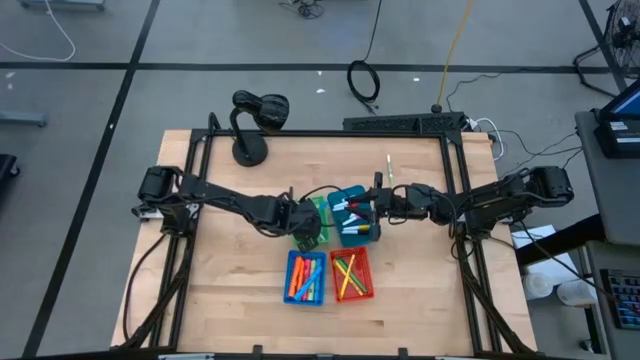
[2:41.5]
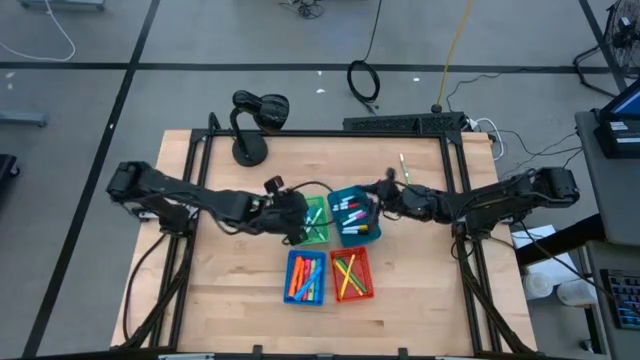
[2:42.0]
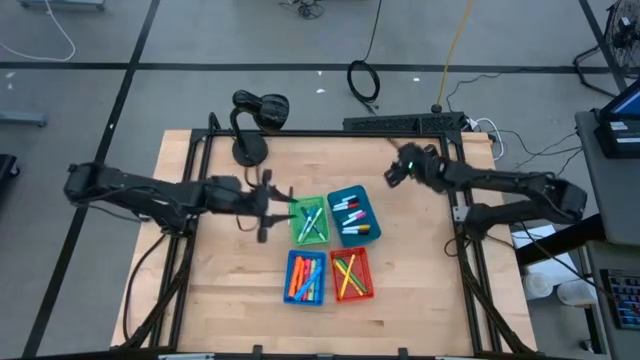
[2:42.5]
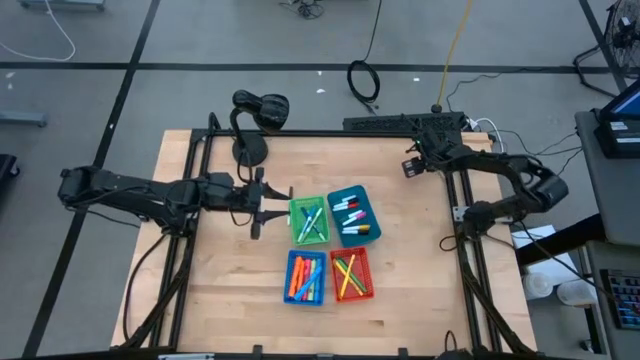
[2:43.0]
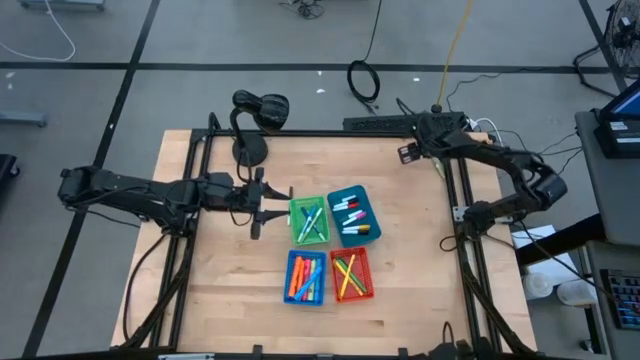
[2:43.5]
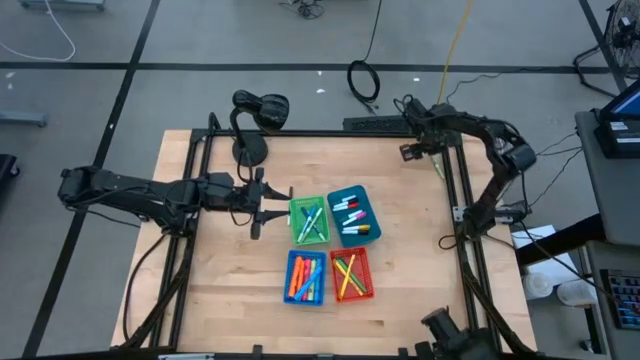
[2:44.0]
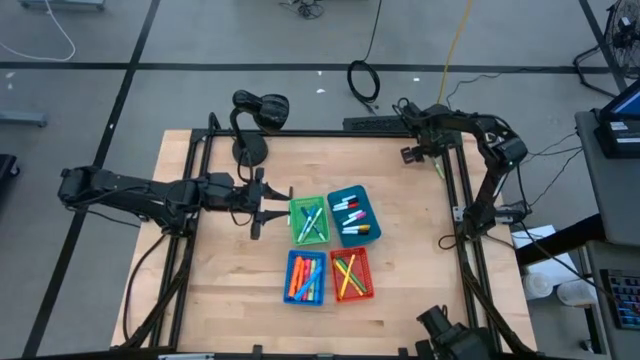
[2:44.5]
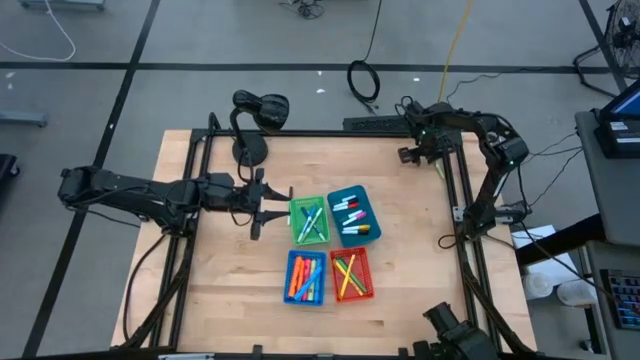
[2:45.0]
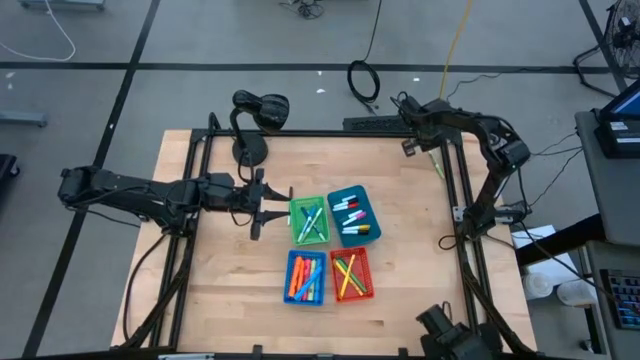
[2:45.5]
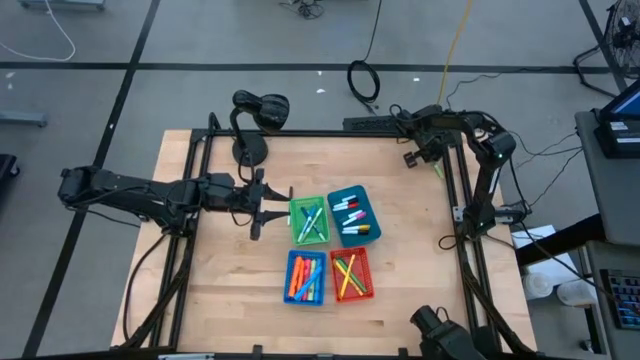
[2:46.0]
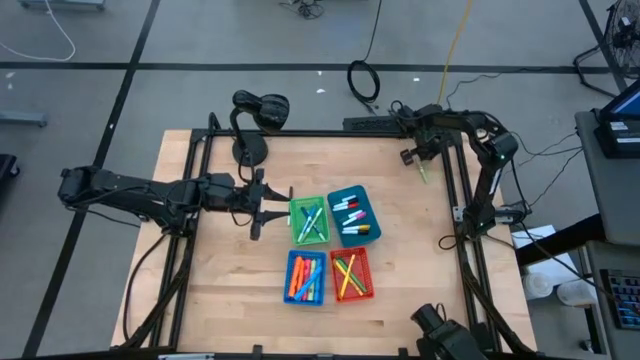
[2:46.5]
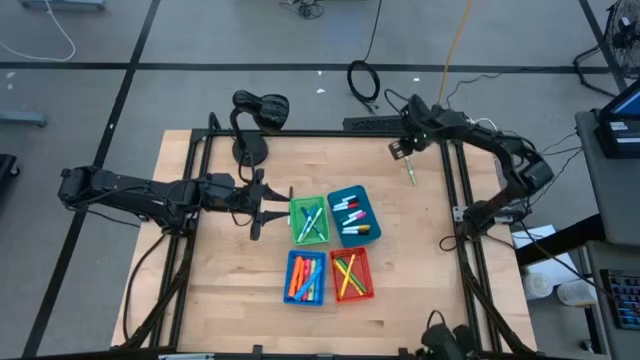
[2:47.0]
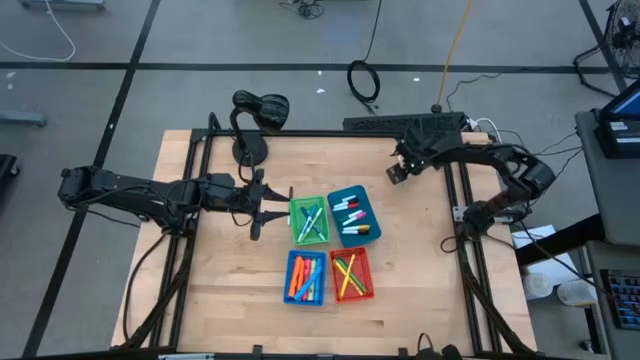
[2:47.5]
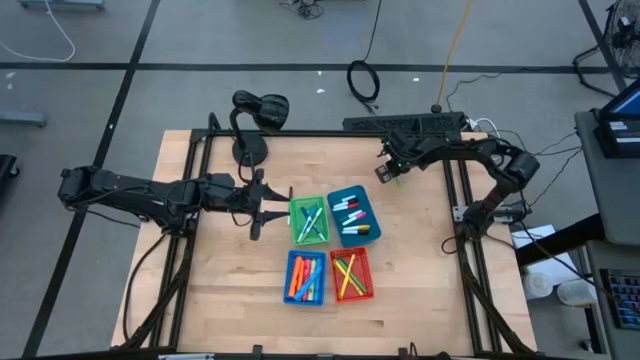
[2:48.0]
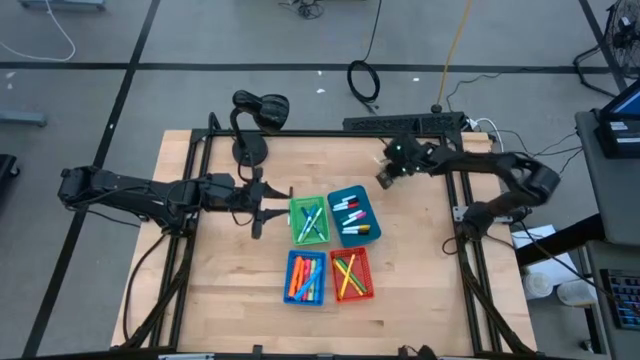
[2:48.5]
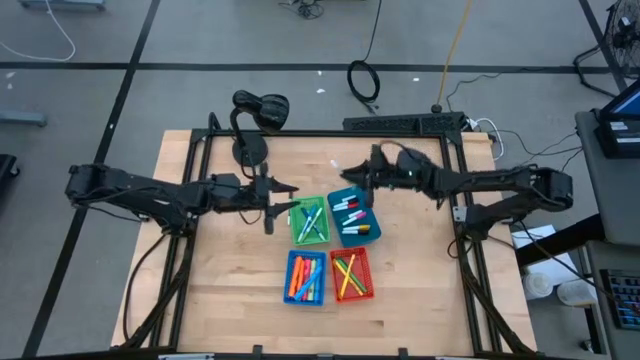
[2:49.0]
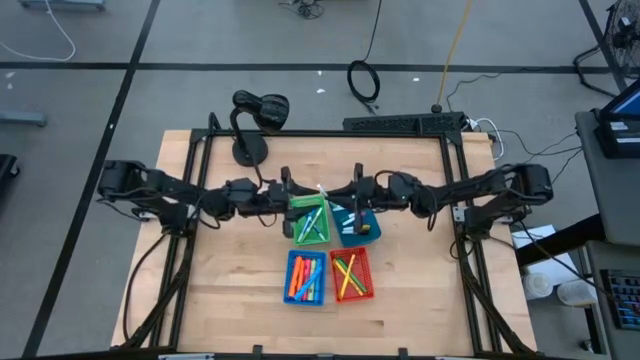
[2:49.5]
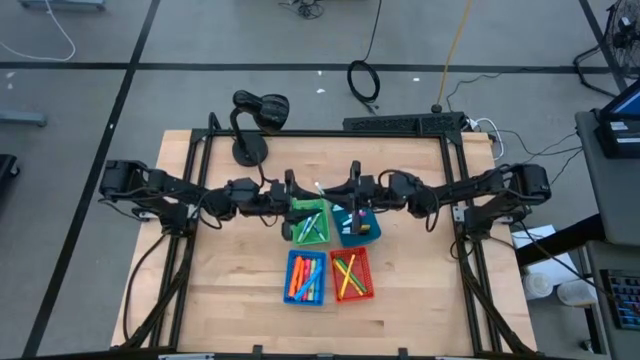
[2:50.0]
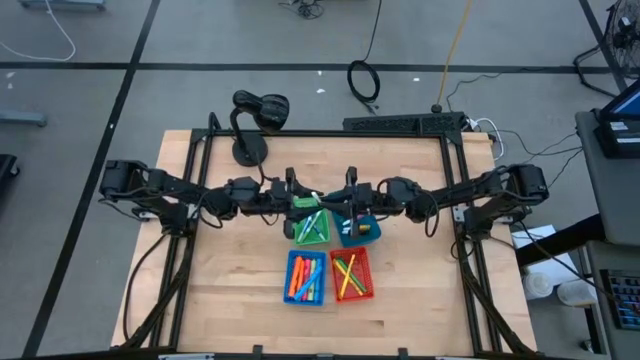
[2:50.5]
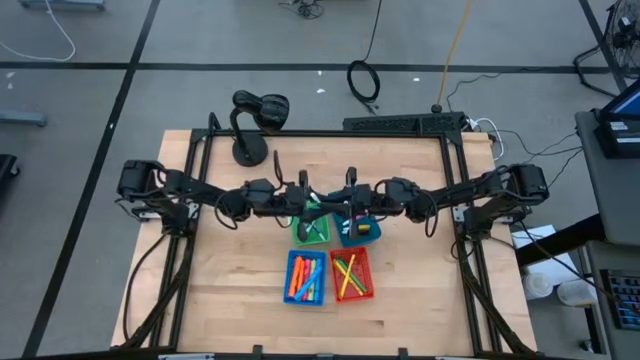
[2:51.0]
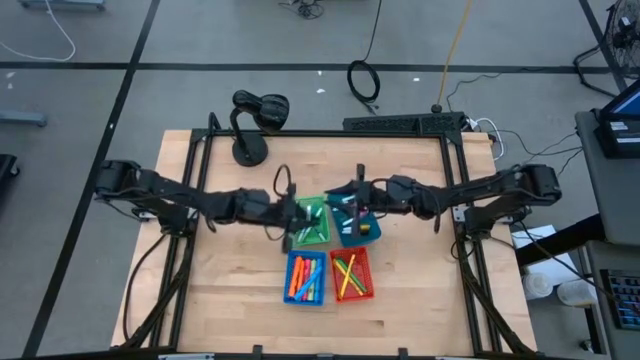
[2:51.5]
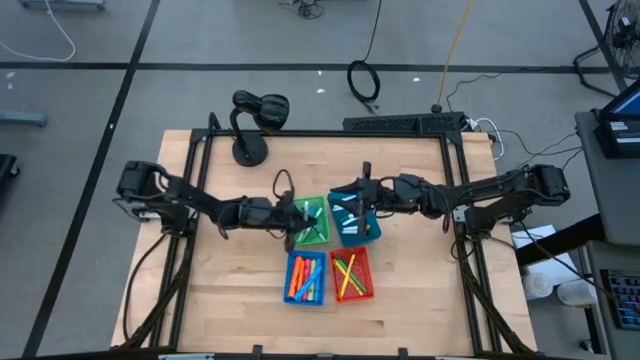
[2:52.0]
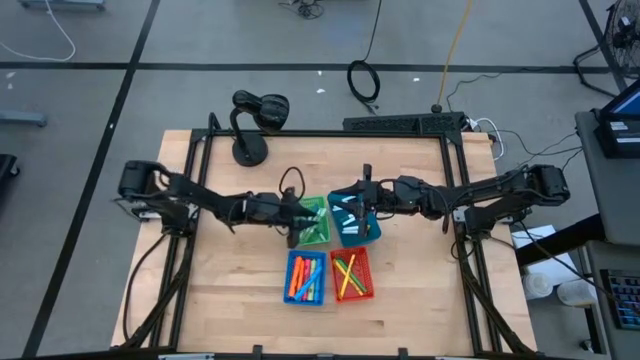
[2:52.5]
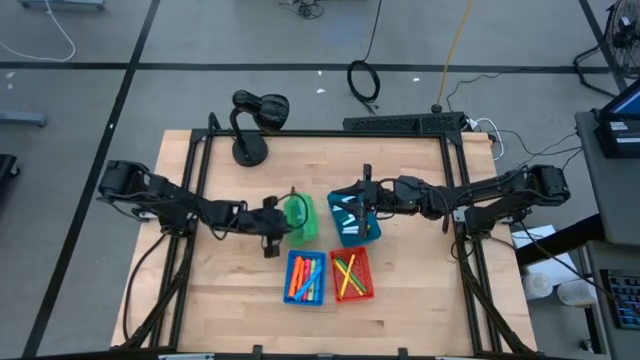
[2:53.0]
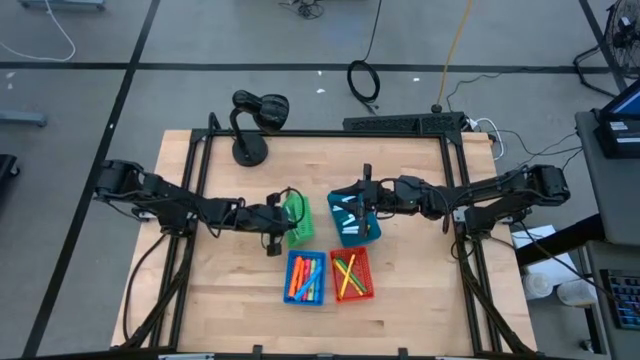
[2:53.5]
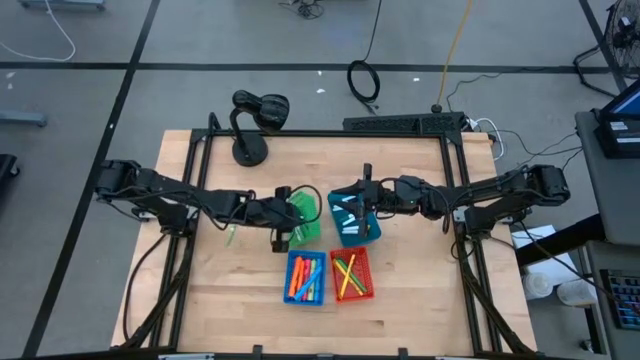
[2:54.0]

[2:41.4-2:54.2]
Task: Pick & Place Markers
Put the green marker into the green bin

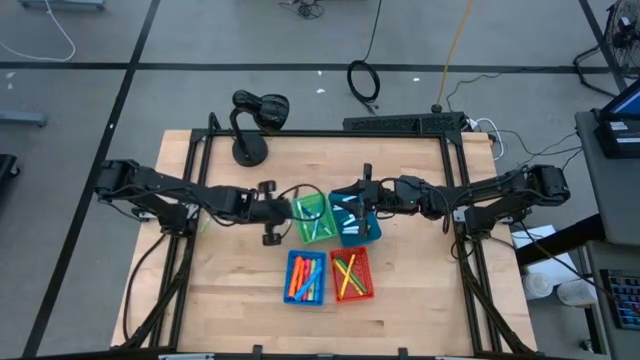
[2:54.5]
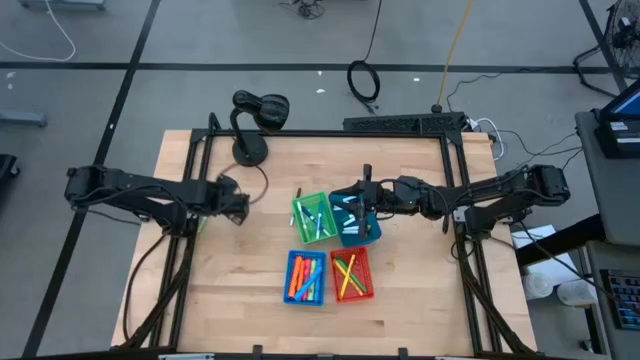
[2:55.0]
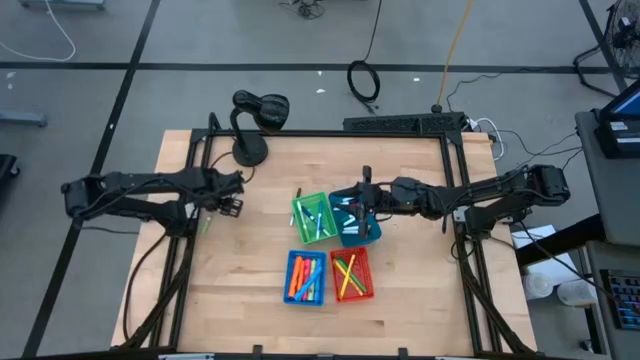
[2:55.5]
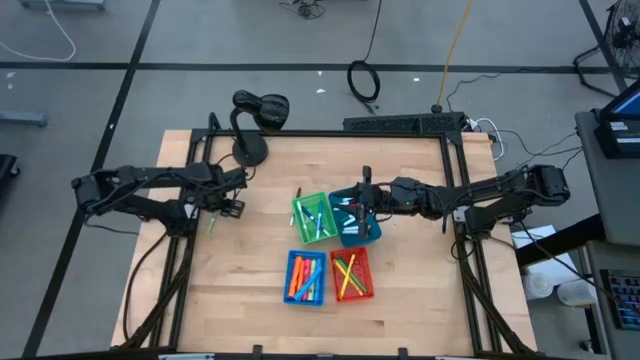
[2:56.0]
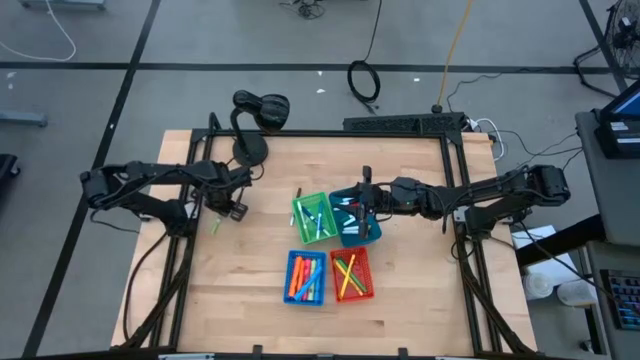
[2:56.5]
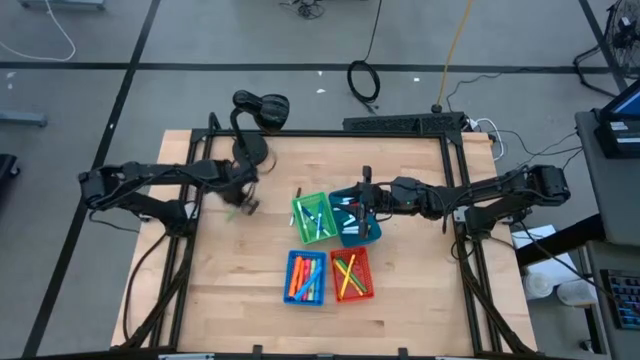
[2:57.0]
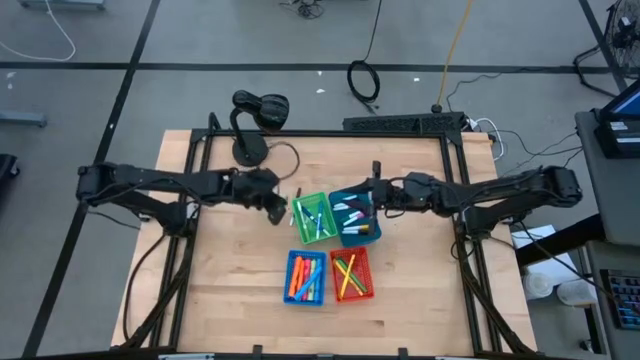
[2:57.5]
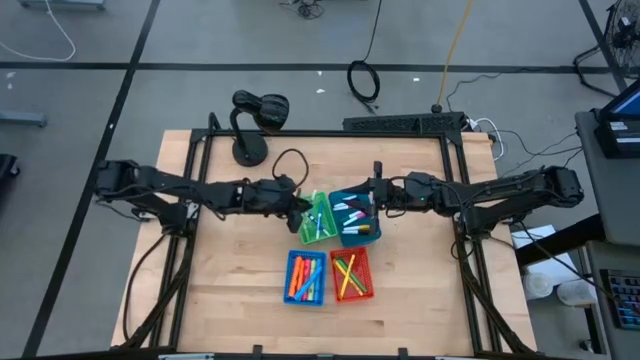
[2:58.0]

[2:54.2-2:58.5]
Put the green marker into the green bin

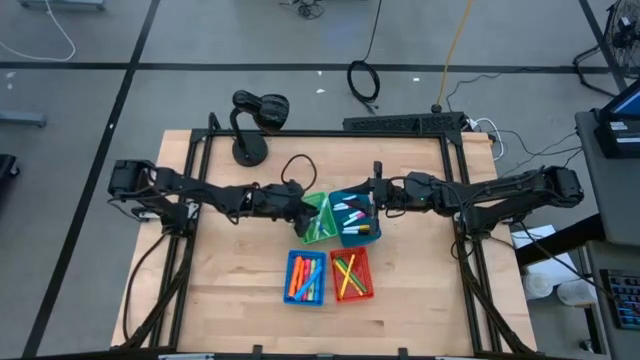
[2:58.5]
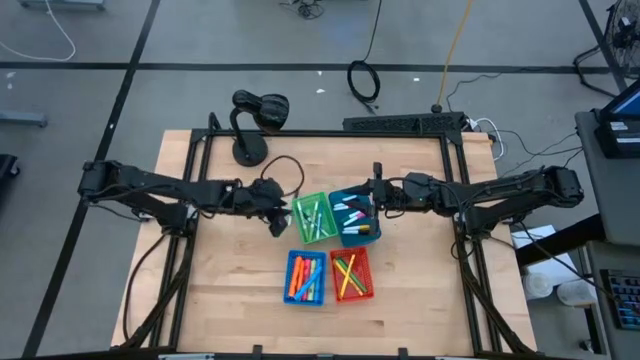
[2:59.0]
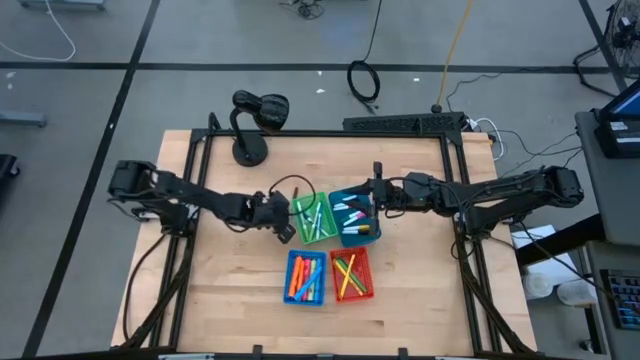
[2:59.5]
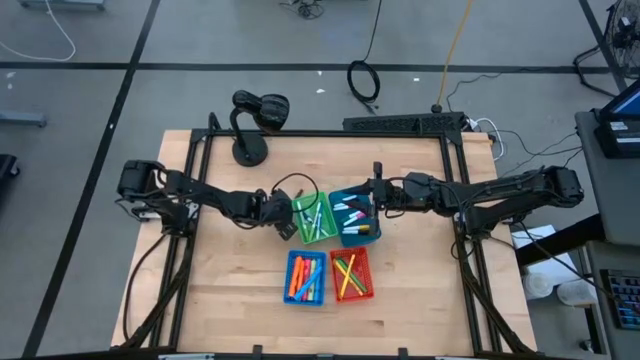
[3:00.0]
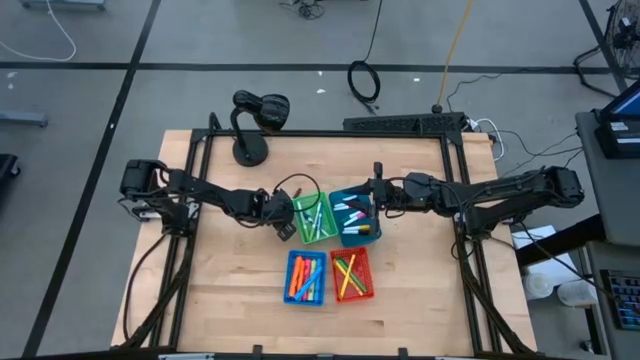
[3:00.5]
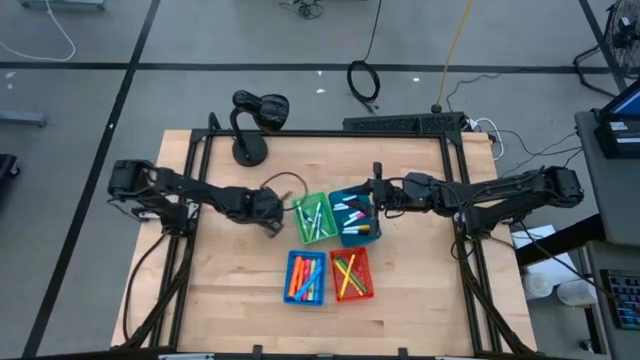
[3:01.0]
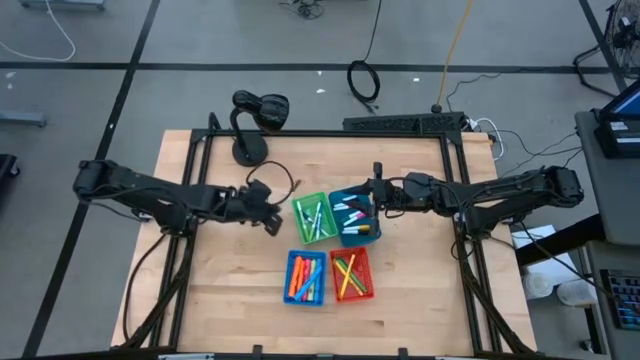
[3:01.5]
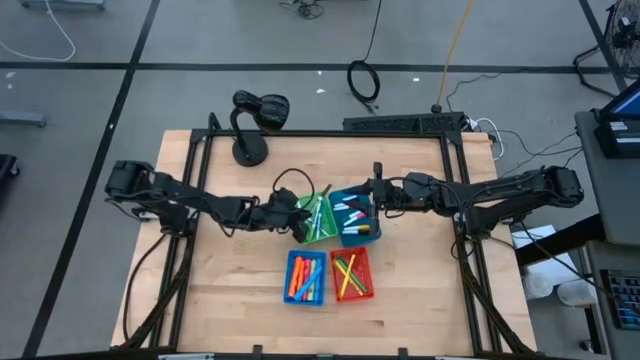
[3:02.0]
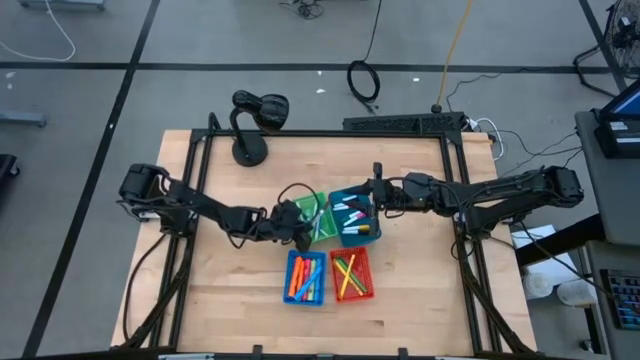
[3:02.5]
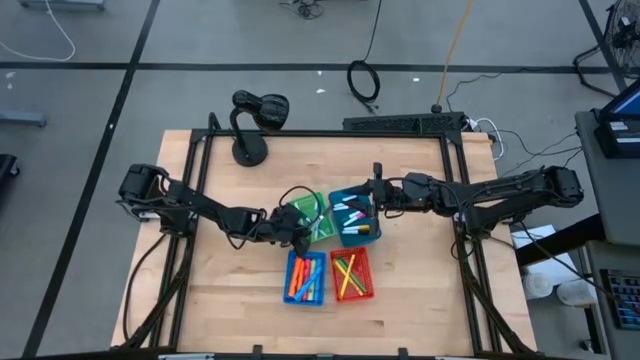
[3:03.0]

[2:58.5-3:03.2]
Put the brown marker into the green bin
